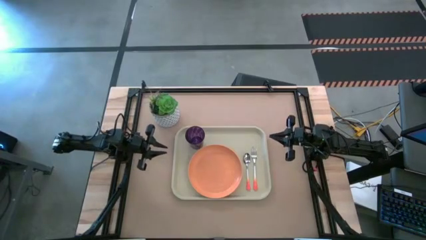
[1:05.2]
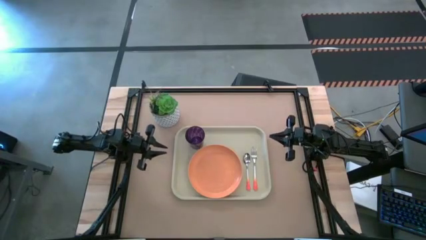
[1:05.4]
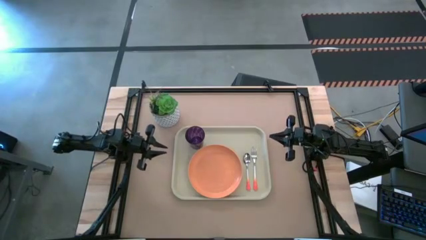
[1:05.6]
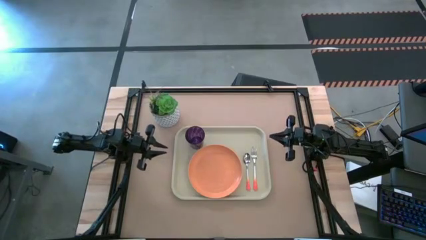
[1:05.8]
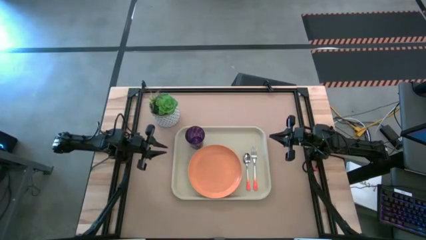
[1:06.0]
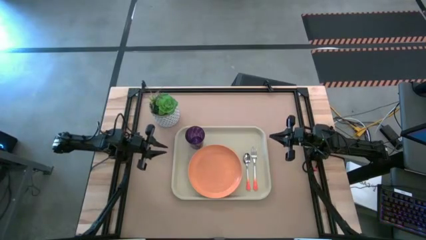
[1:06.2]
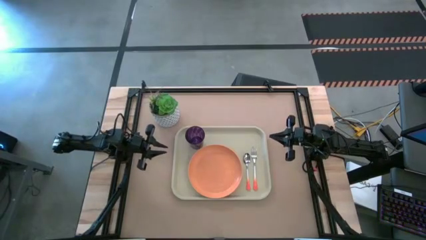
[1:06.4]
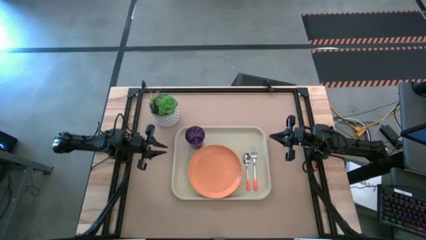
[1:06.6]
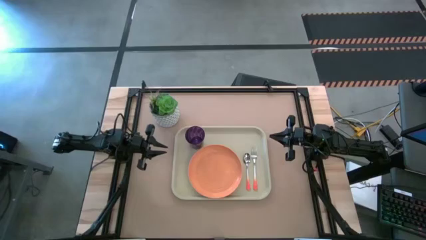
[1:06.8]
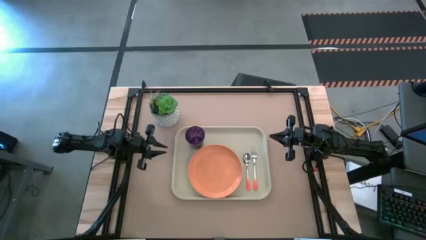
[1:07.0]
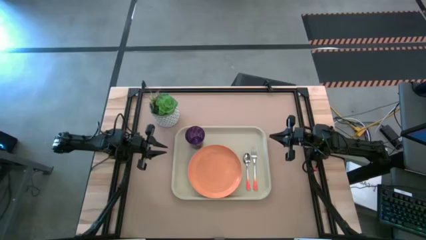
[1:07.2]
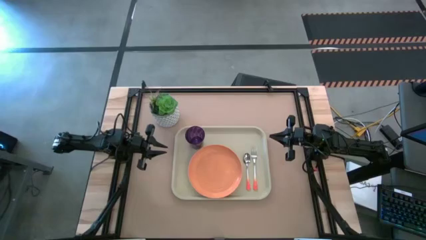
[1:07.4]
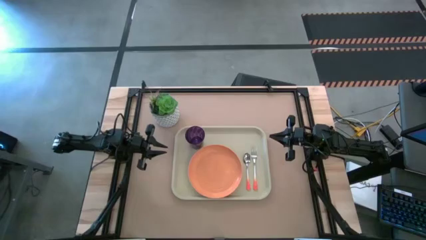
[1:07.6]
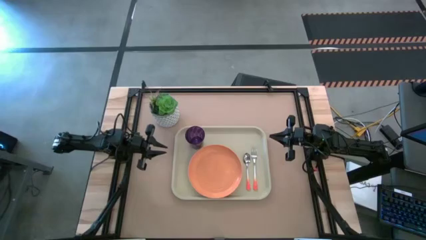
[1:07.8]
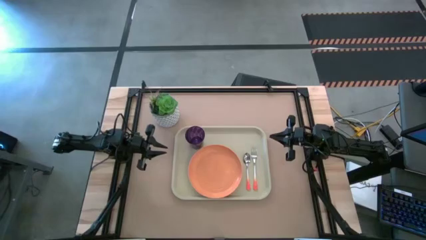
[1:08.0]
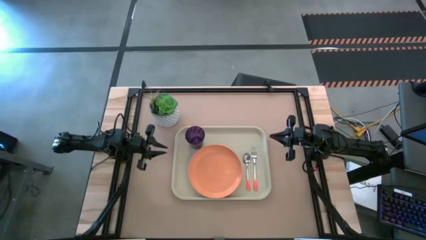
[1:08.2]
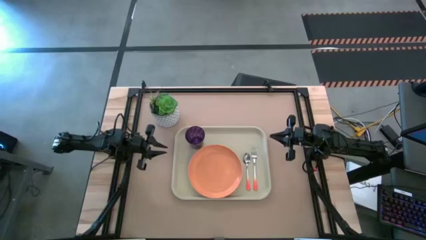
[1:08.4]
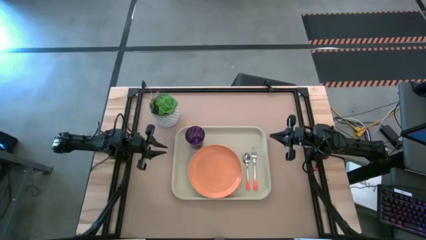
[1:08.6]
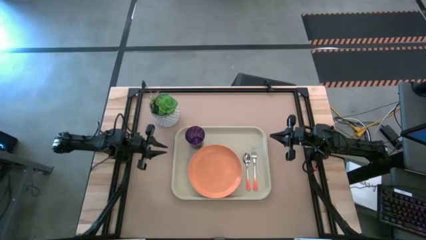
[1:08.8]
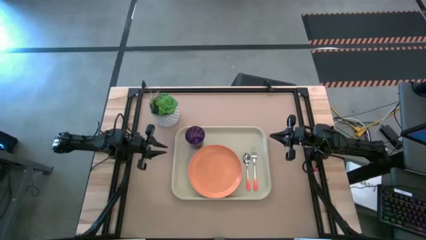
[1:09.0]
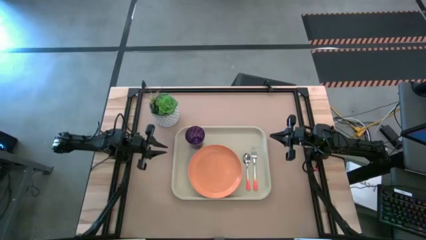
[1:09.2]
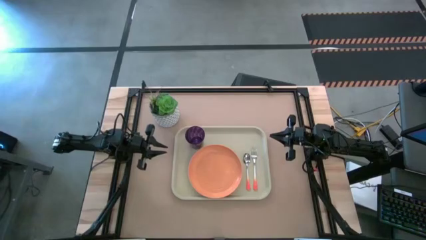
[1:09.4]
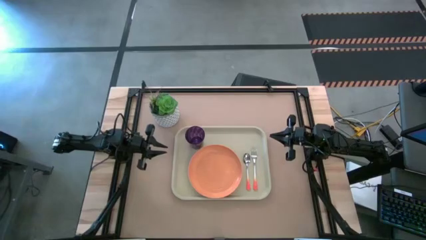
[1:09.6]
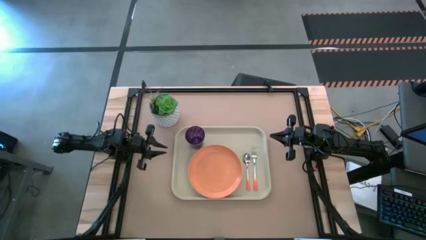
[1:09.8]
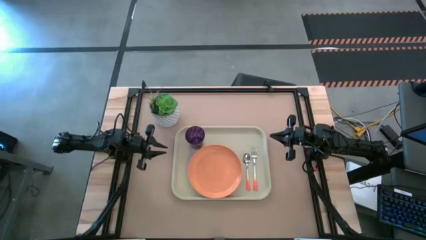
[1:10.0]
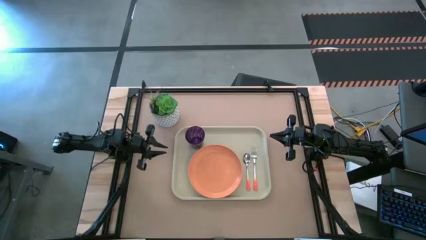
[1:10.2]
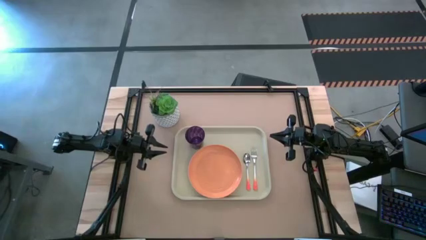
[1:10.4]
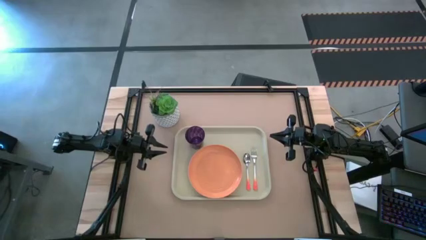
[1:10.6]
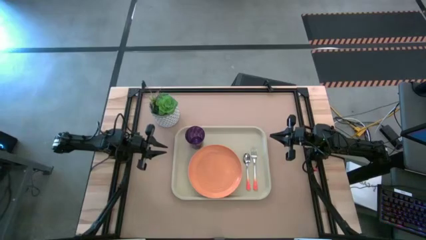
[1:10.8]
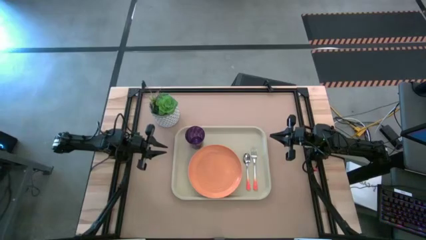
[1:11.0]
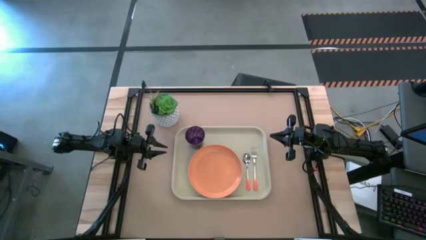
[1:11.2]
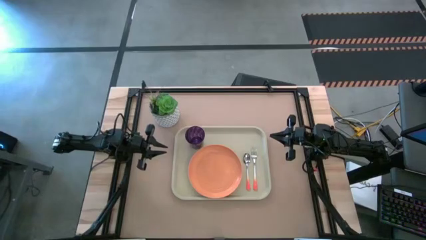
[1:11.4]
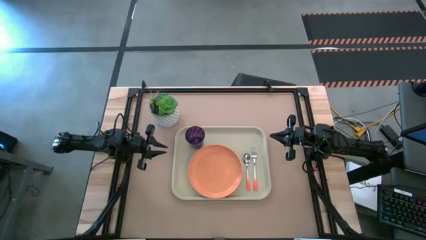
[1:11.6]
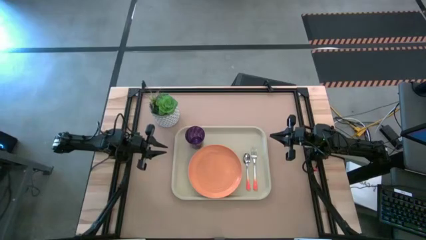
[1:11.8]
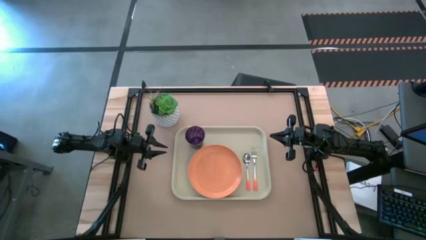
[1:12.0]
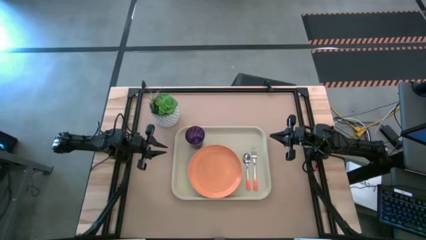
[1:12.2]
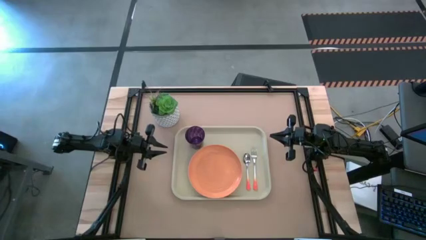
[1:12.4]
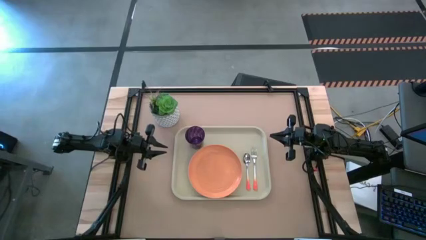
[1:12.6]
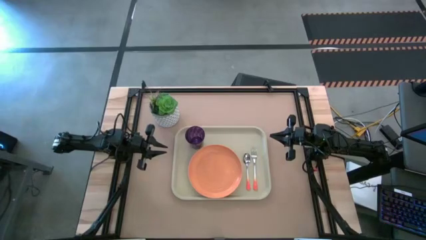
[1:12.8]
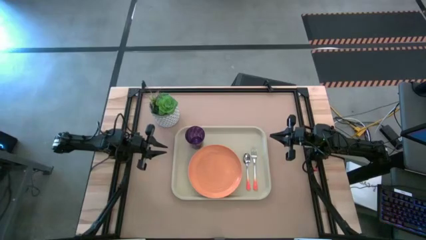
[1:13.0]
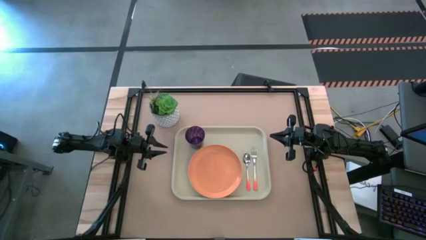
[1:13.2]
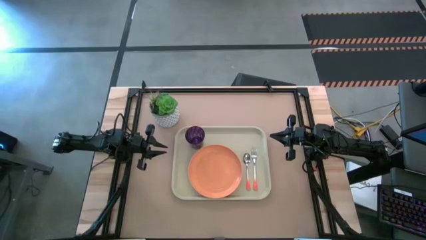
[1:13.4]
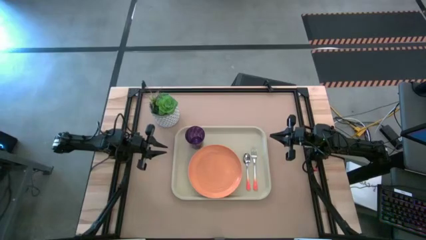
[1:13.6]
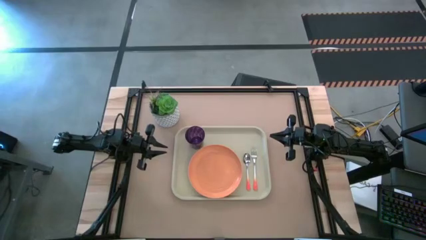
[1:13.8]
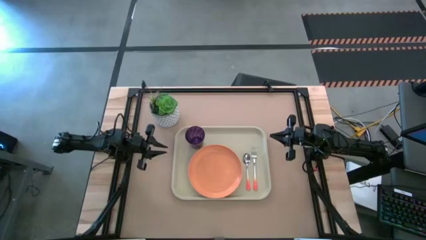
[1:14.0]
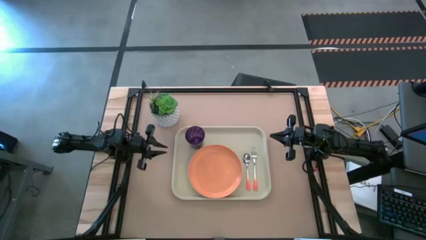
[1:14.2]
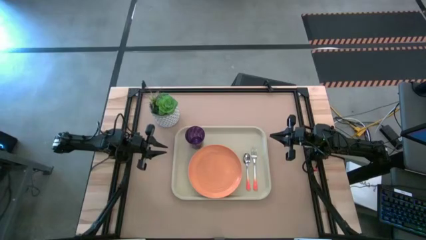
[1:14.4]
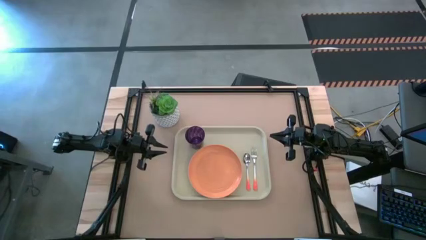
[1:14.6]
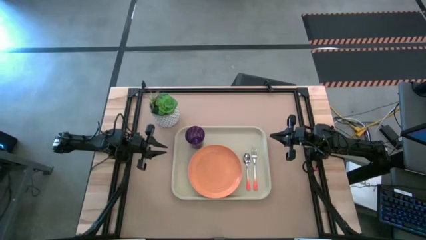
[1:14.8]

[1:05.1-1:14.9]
Task: Pick and place plate/cup/fork/spoon on tray
Return to Home Position

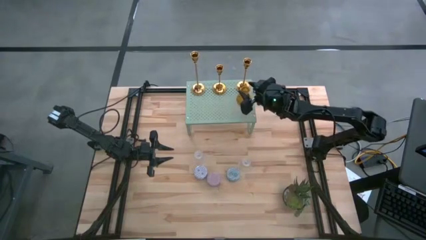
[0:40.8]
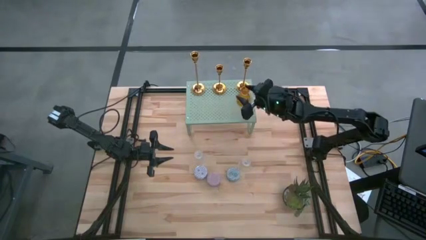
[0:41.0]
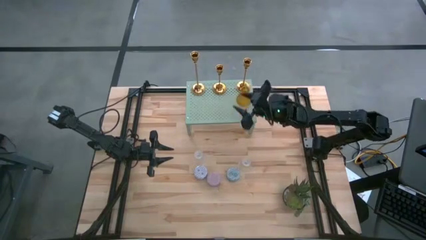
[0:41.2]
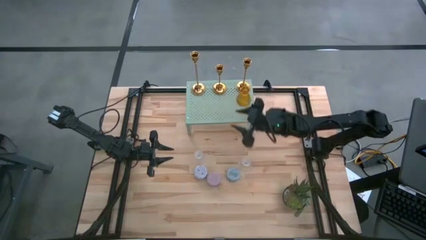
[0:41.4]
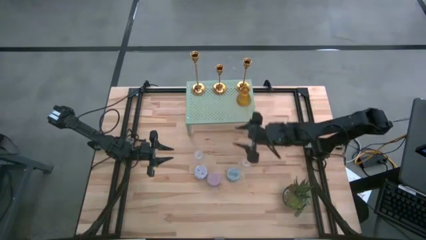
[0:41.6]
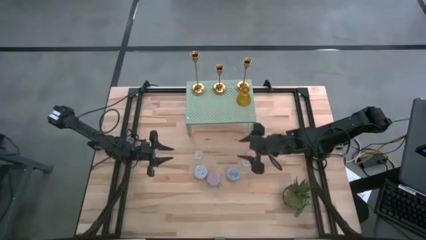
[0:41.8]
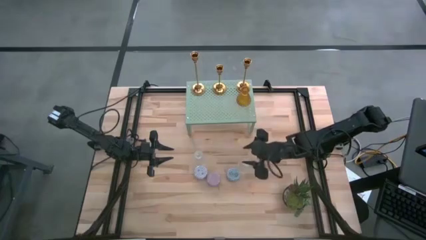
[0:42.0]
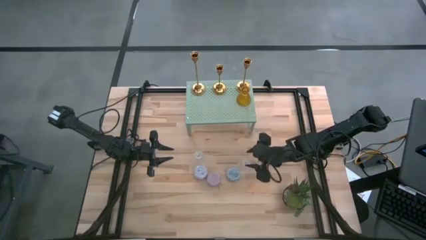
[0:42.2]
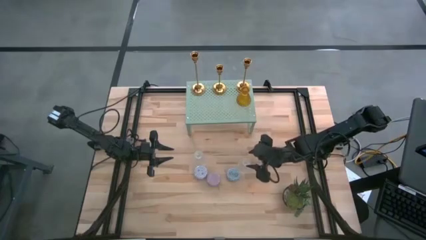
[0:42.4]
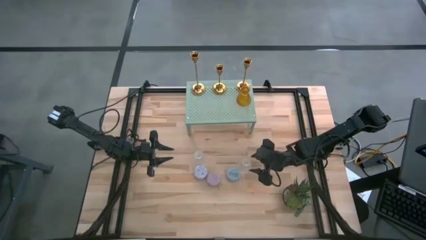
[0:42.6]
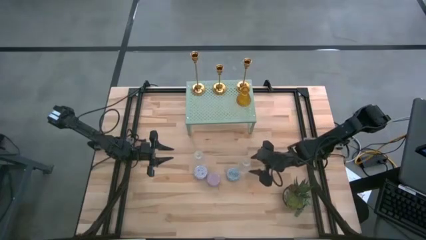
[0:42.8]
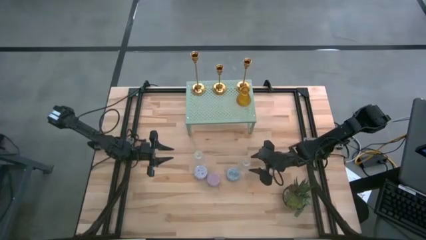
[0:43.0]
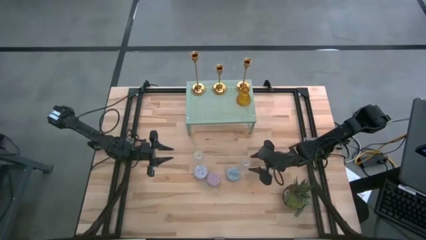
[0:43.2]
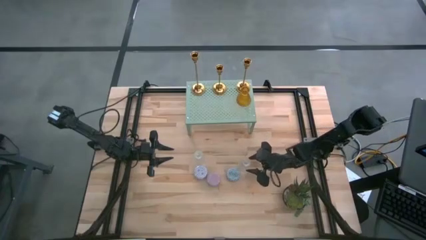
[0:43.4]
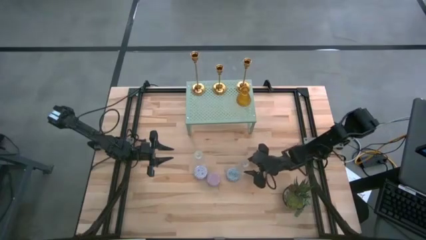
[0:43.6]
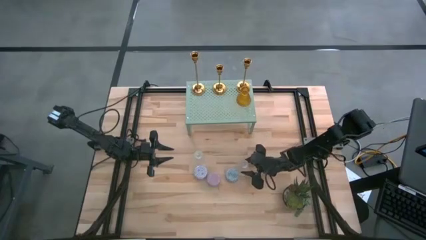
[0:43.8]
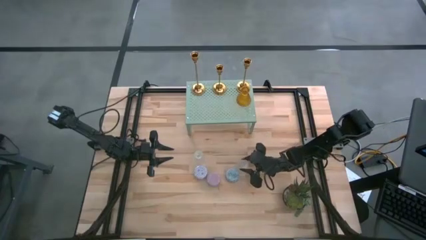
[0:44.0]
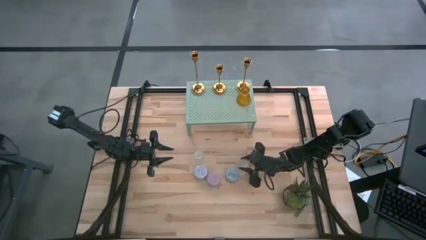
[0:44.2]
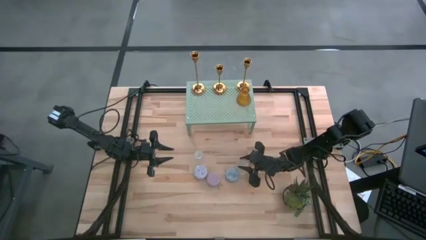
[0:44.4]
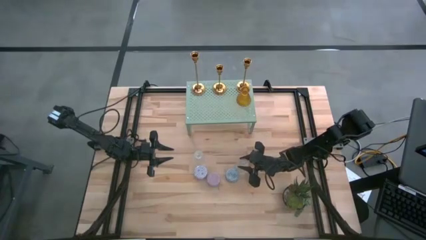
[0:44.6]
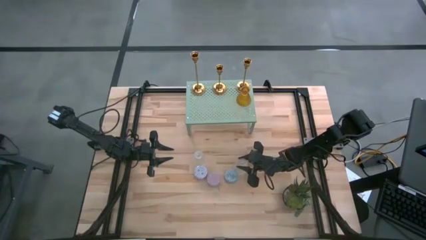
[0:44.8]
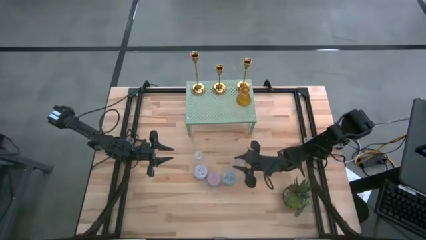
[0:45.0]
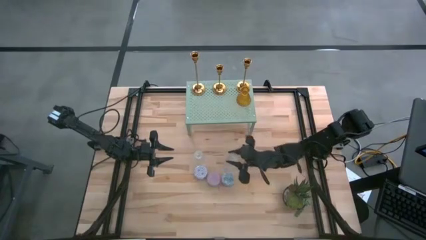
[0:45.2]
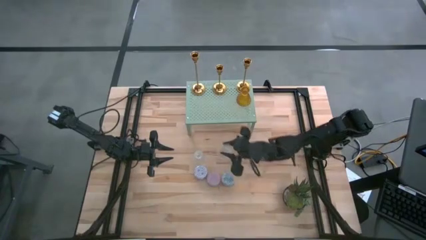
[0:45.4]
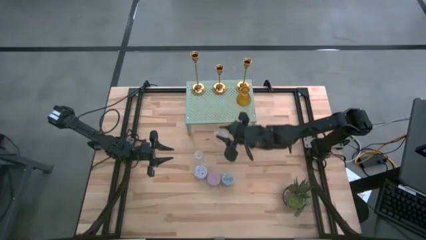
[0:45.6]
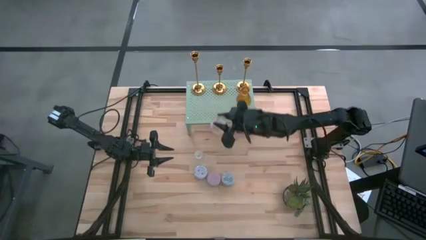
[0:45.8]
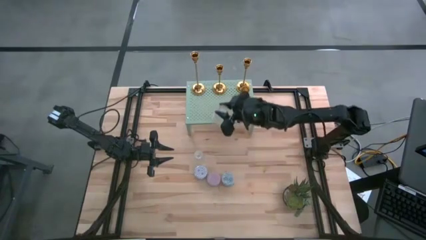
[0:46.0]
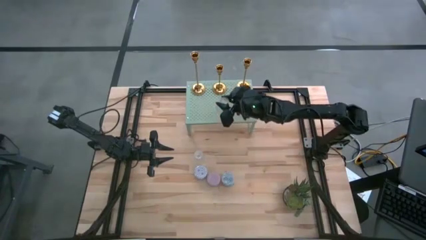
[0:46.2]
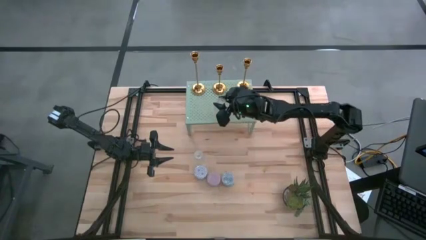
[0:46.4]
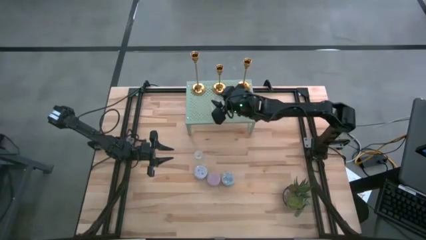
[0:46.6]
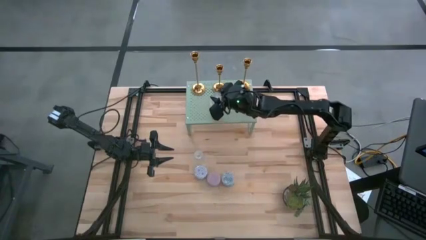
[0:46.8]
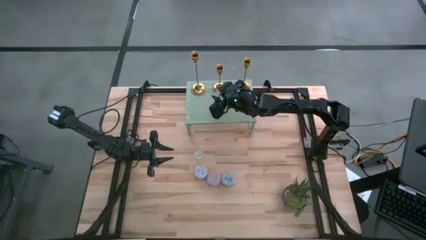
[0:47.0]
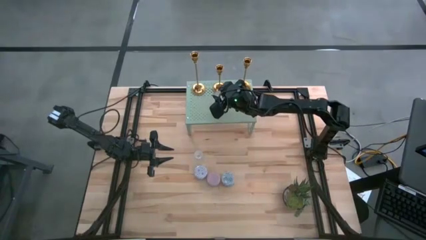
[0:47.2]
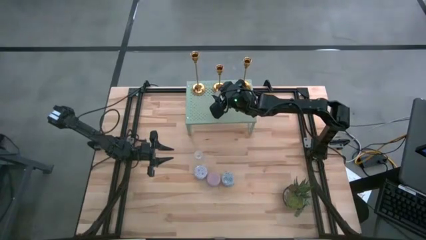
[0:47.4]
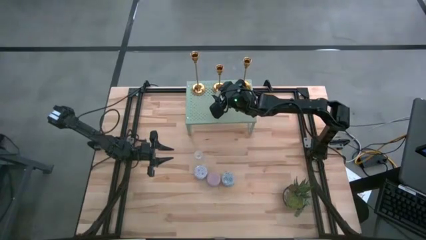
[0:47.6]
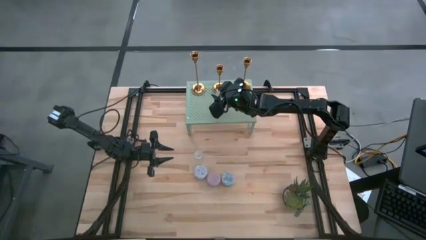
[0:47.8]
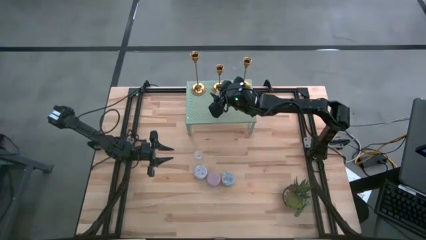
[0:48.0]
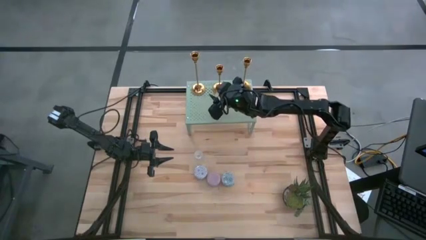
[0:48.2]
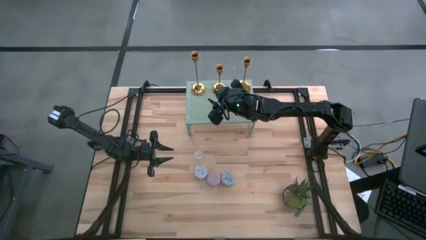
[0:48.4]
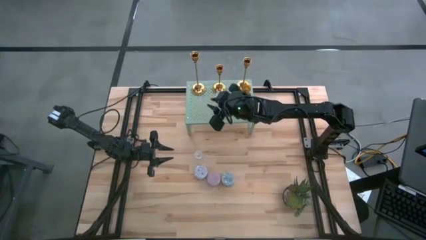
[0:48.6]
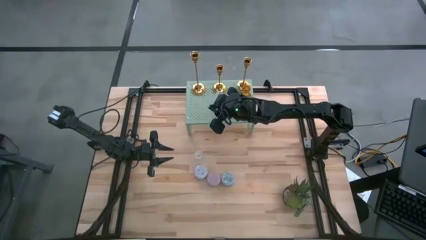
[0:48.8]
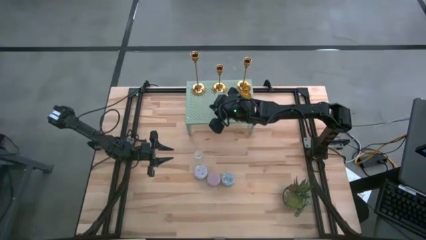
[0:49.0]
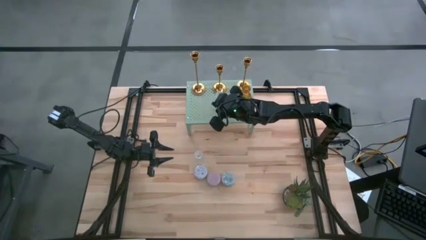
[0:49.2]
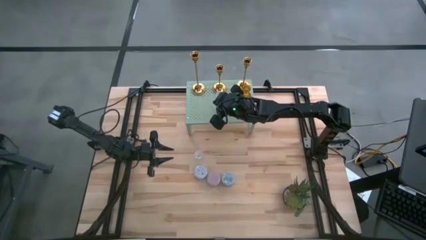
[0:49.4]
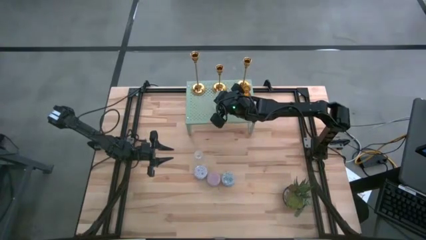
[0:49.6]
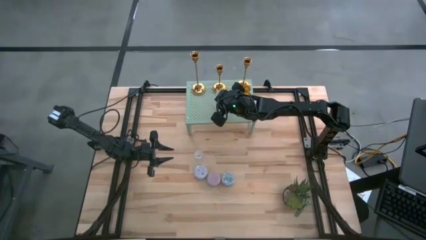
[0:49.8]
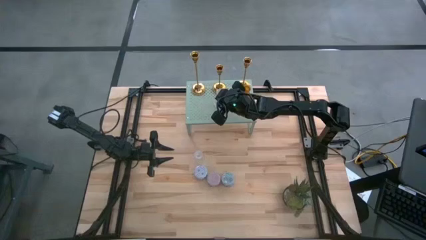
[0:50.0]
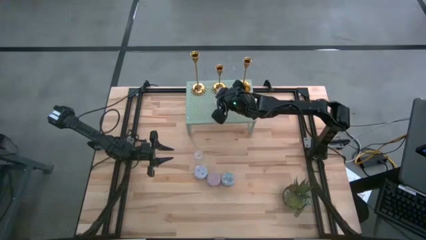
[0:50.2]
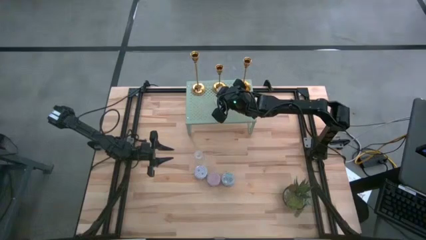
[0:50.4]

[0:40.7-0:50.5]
Task: Pick & Place candle stick holders
Put the right transparent candle holder on the shelf
